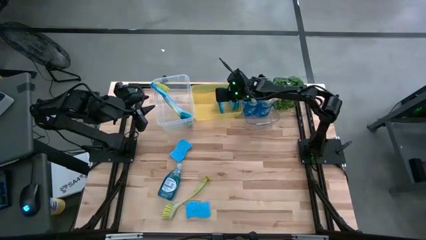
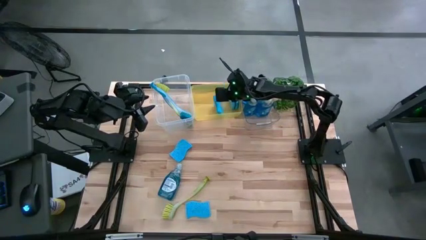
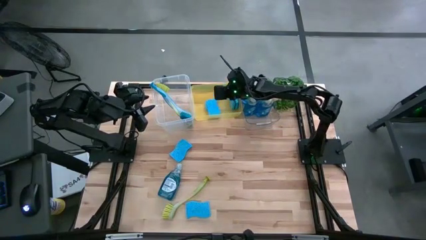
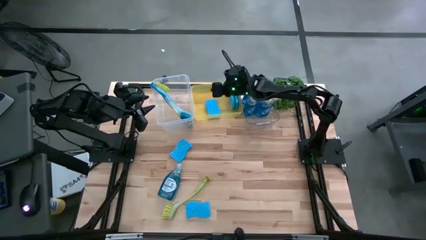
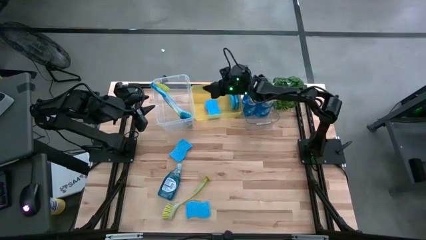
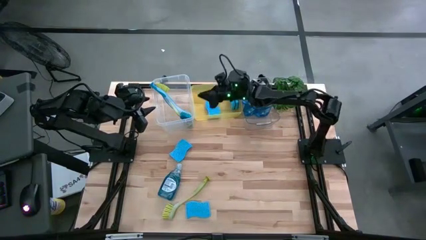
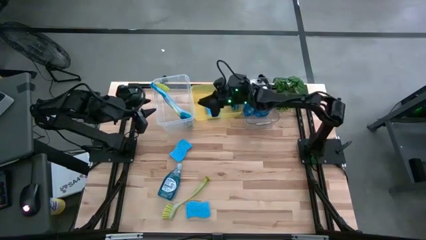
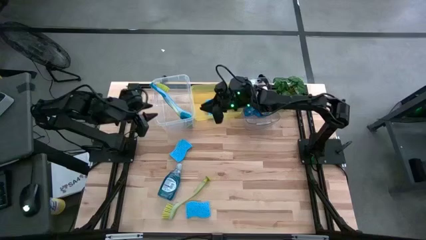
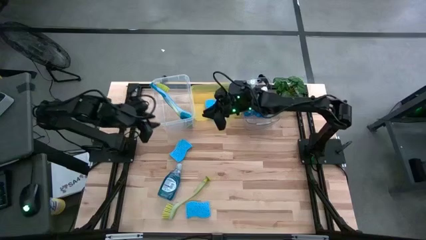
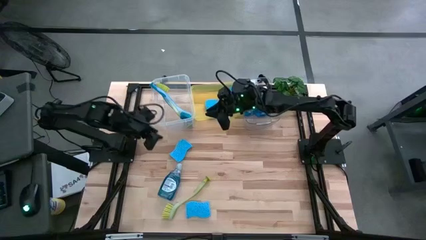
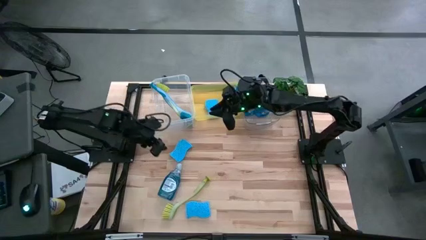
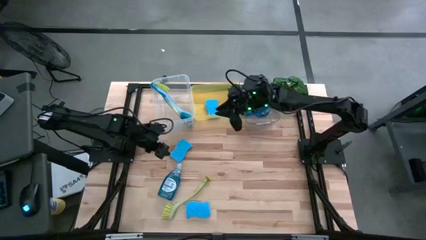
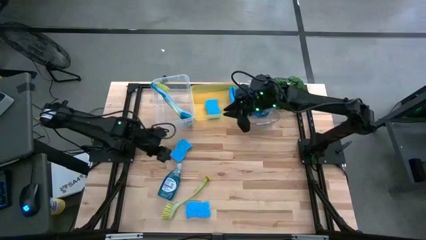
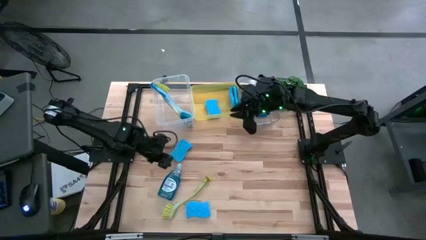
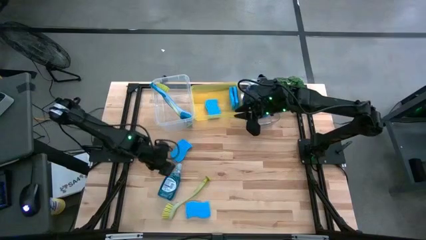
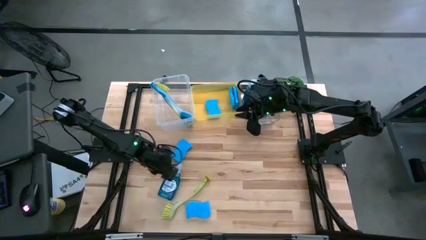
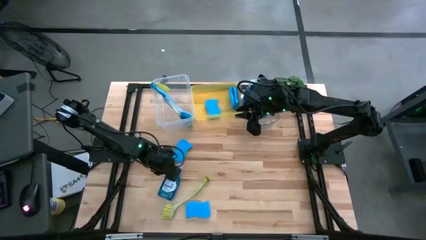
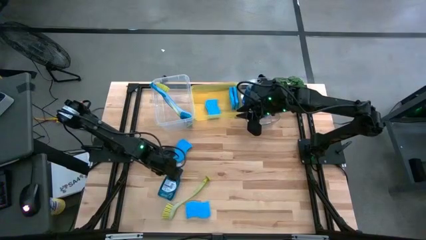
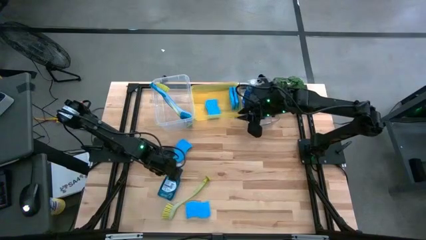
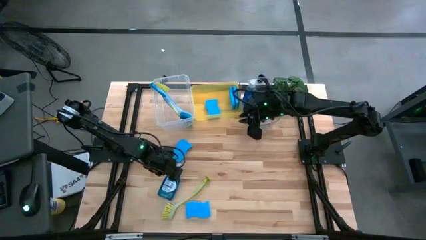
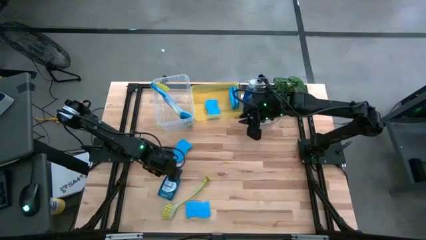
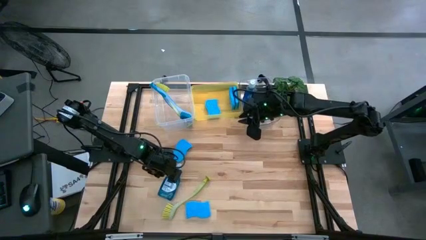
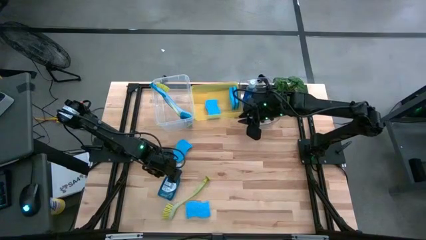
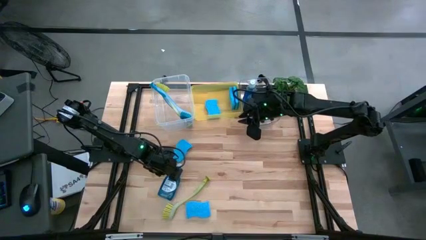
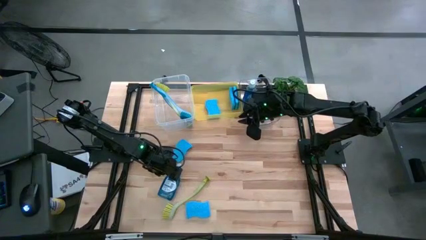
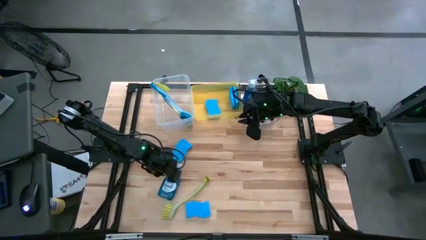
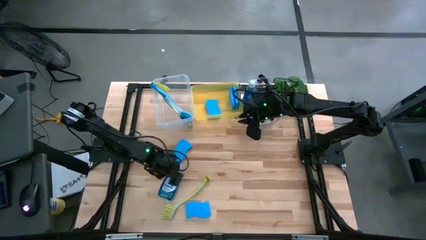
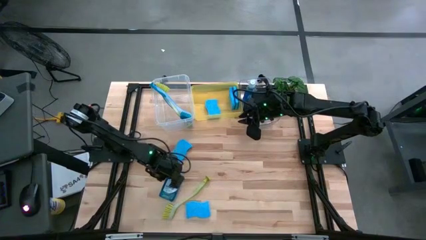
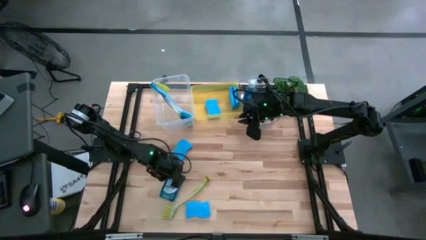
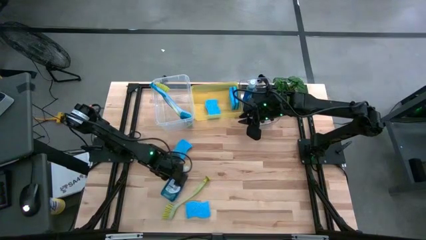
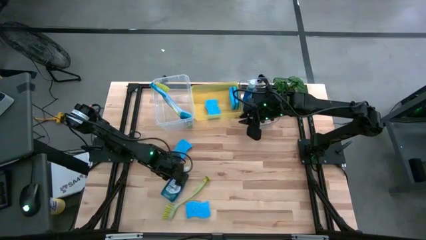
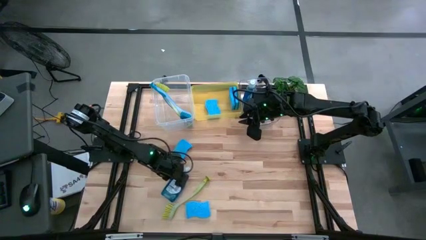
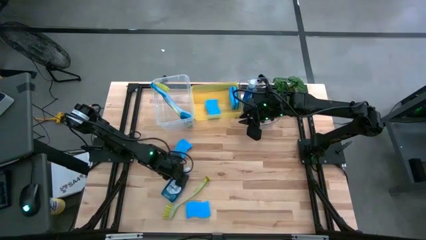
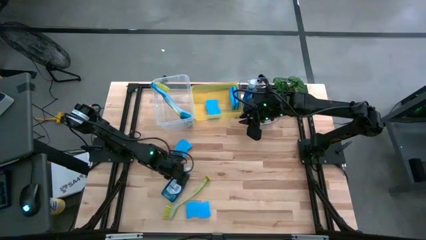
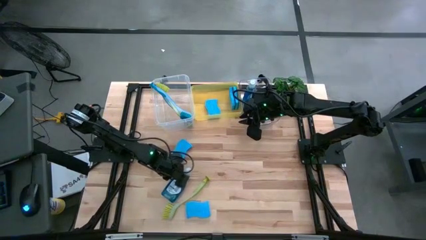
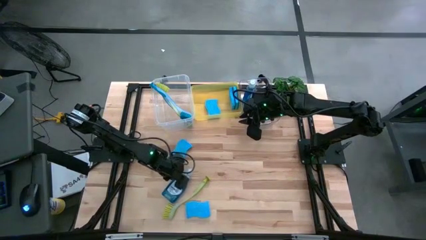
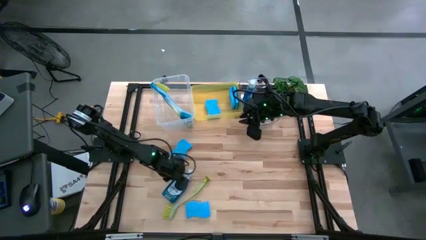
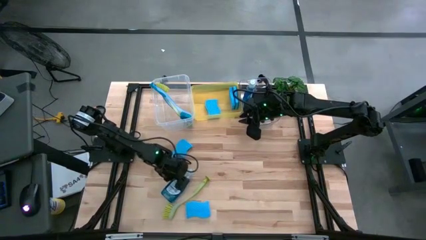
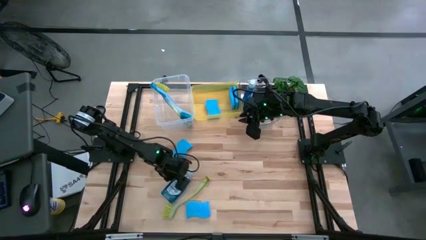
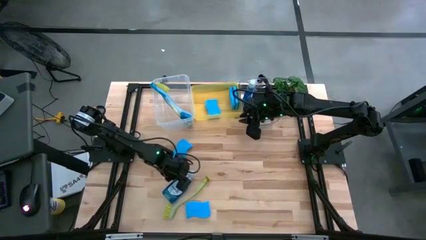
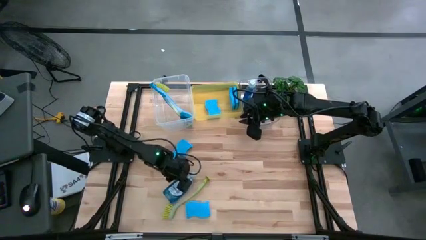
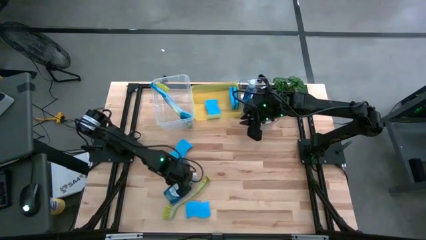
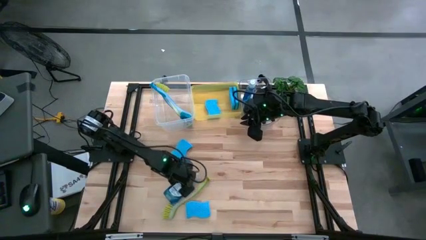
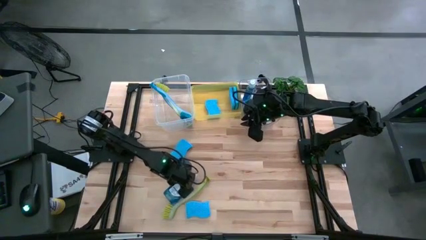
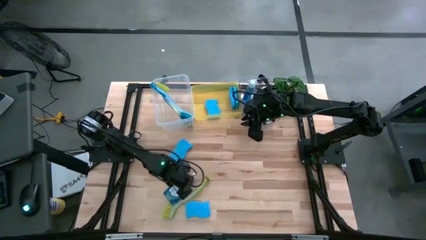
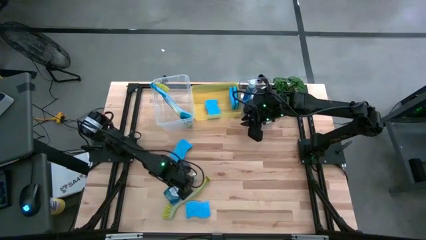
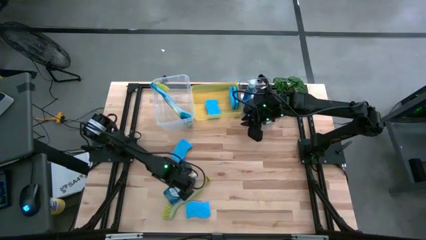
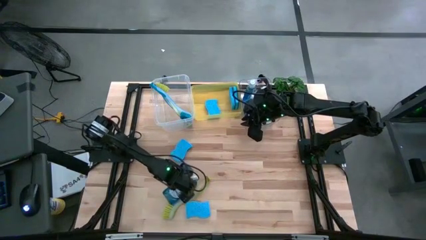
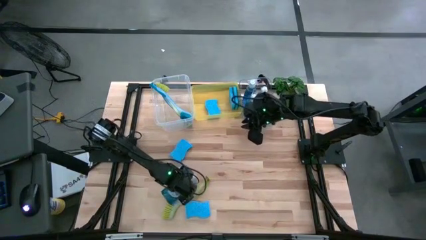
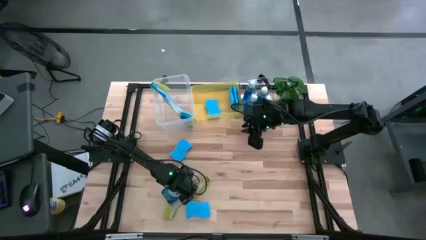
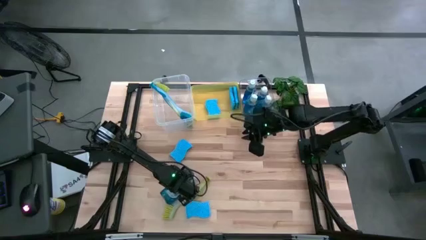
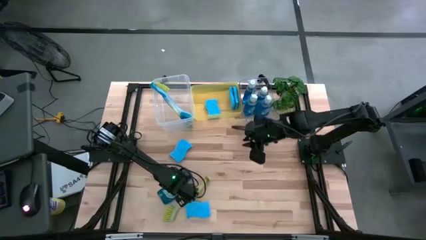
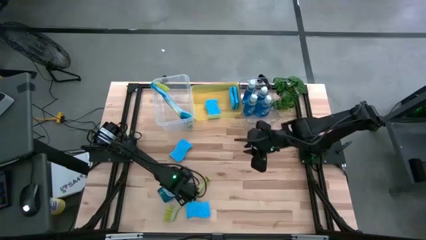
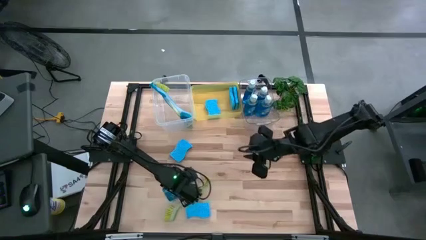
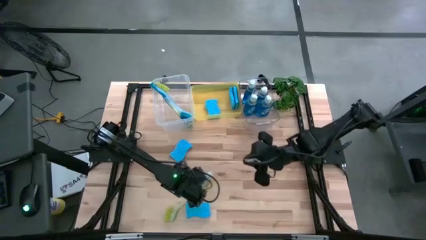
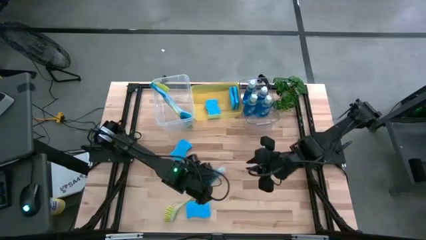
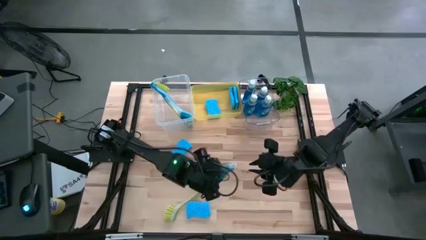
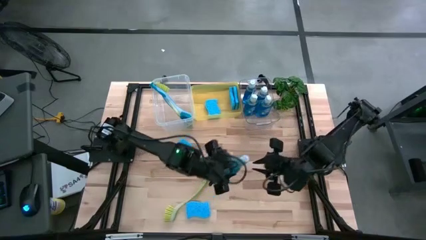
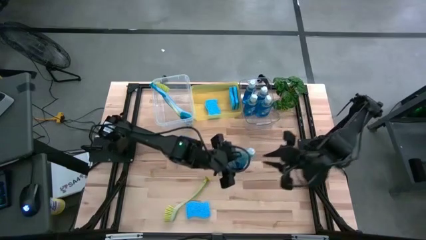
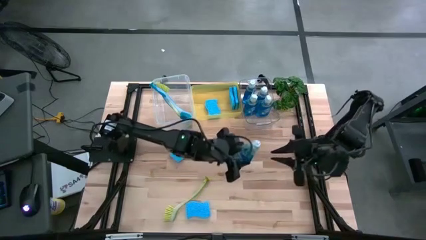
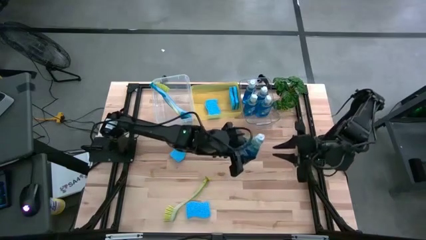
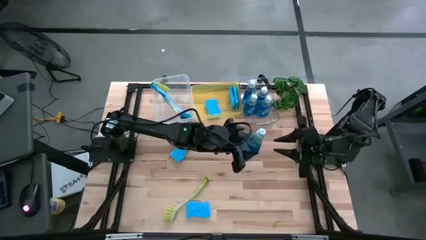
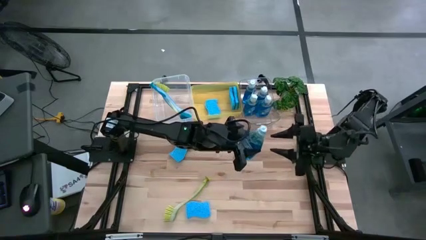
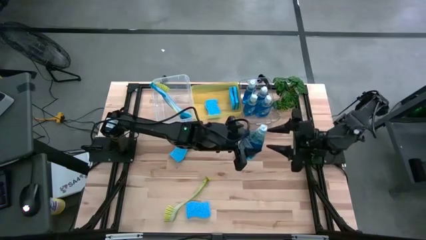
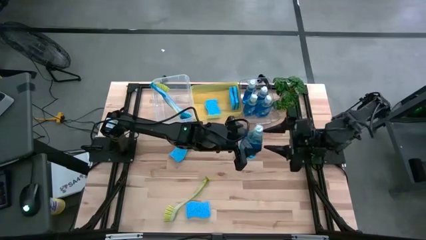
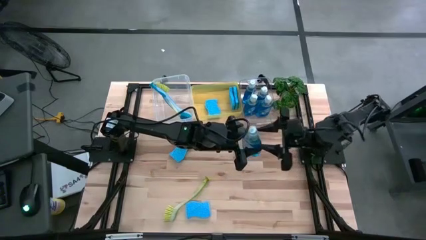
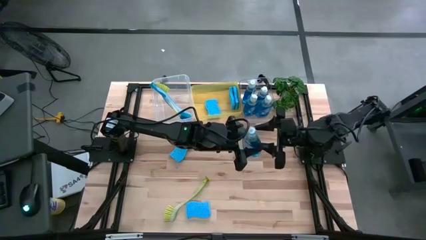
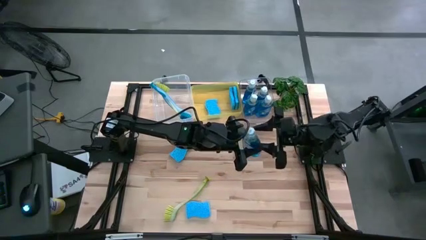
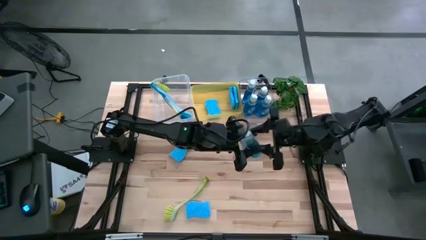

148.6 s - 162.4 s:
Task: Pick & Place Kitchen Sink Supplies
Put the blue dishwasher liquid into the transparent bin

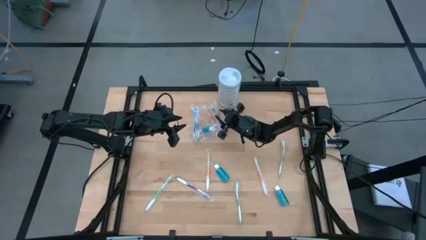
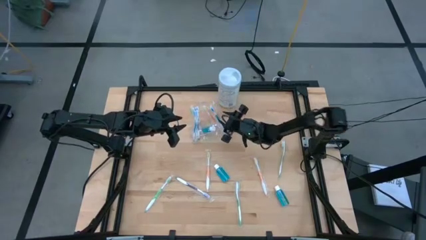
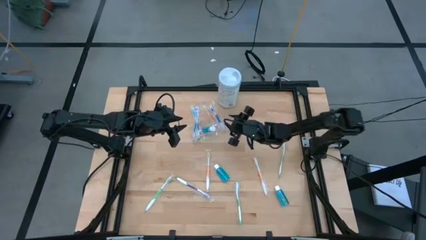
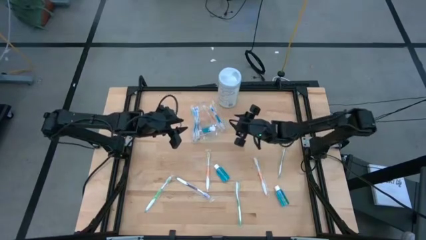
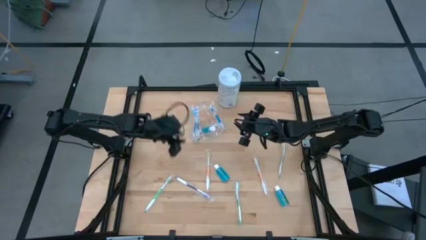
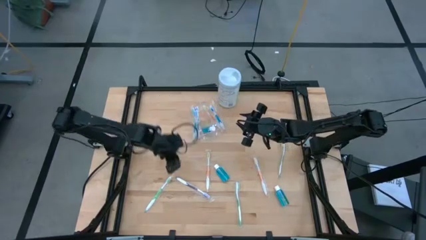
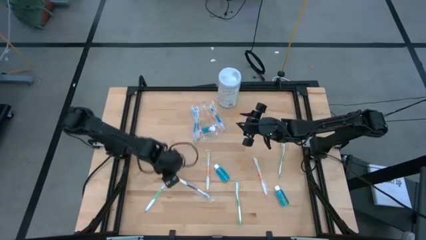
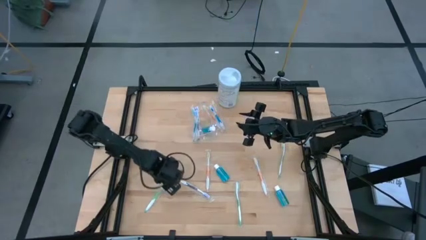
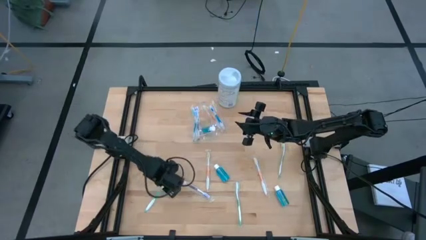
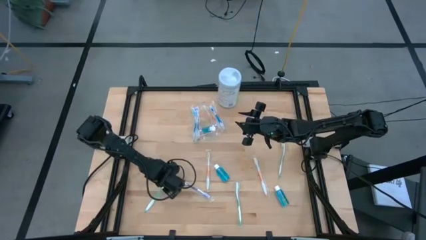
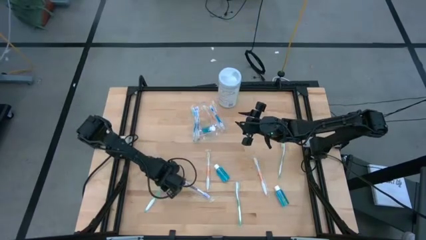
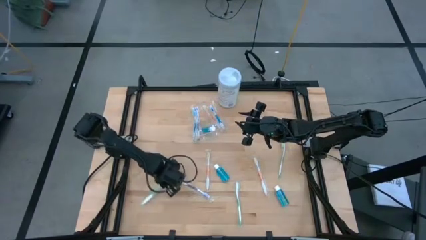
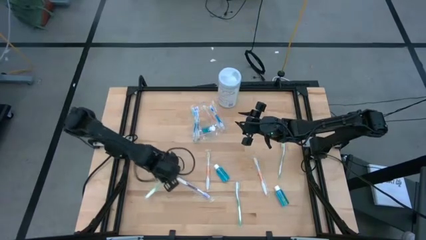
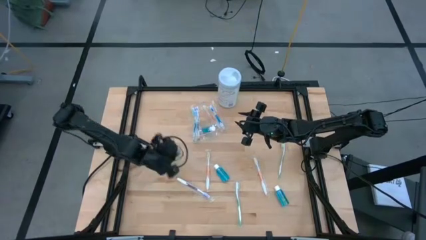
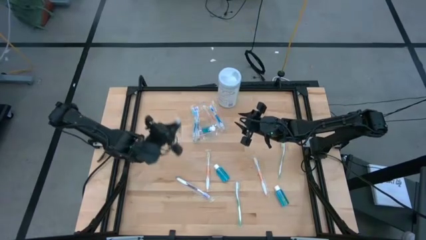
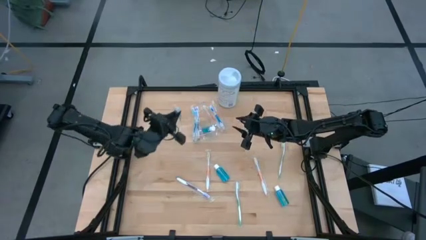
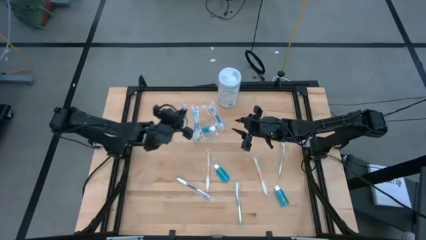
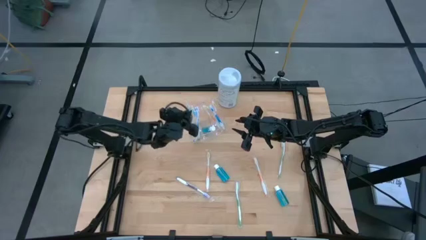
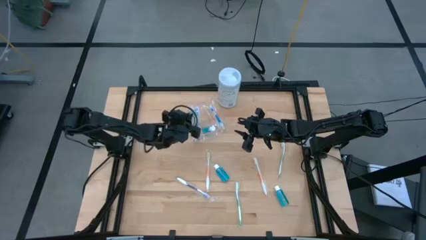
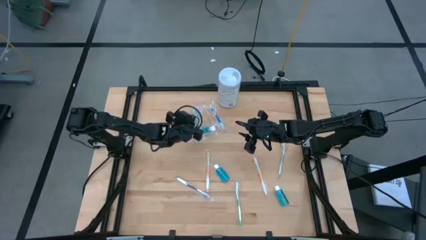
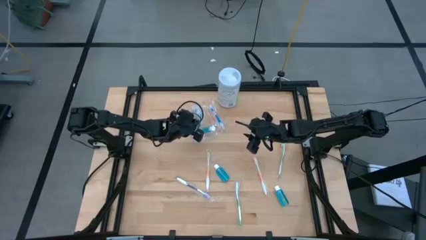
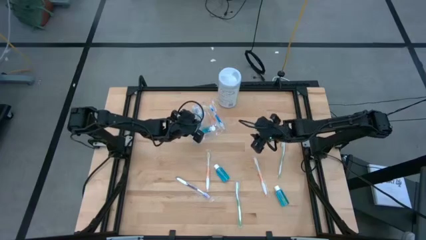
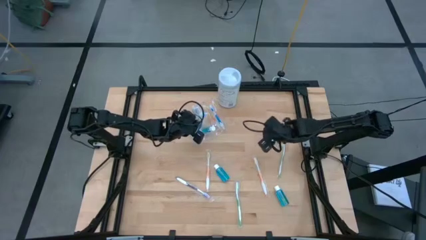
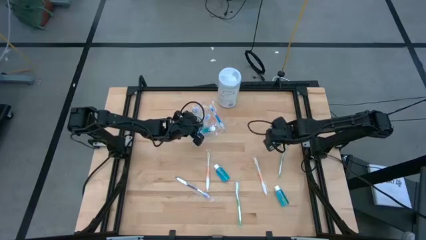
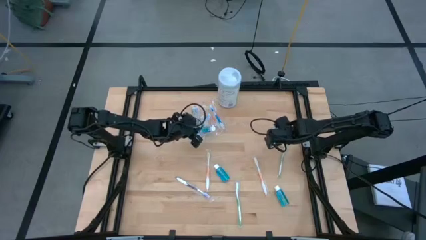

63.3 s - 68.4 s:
Task: Pick & Place toothbrushing station
Put the green toothbrush into the transparent organizer
